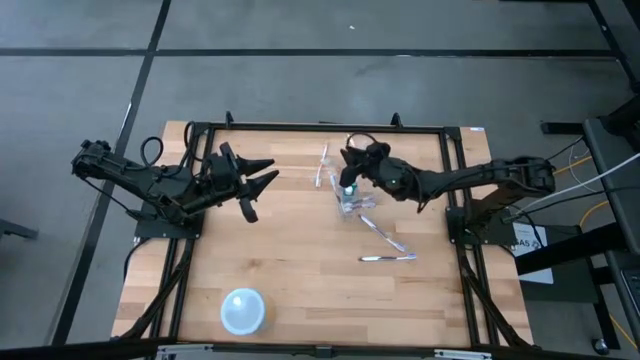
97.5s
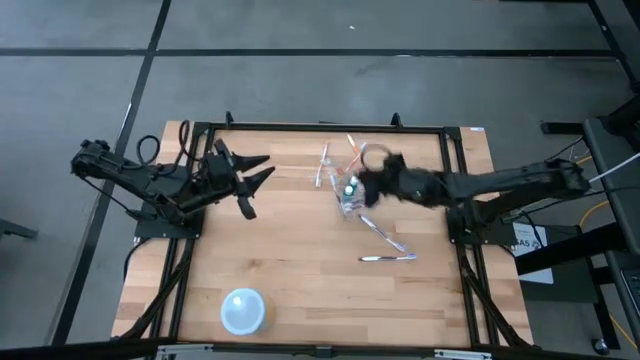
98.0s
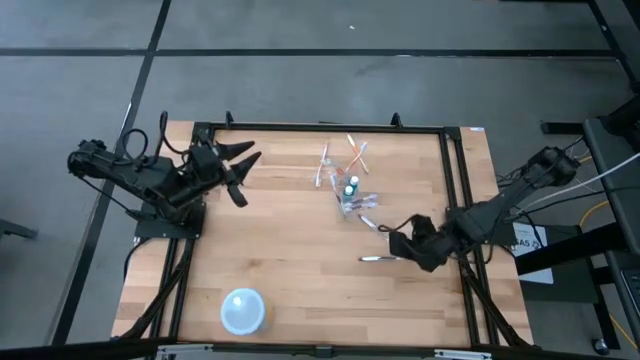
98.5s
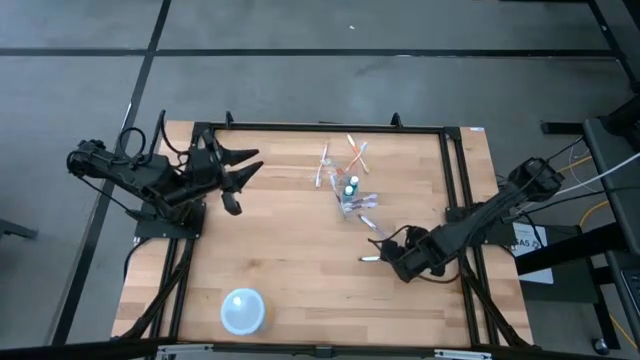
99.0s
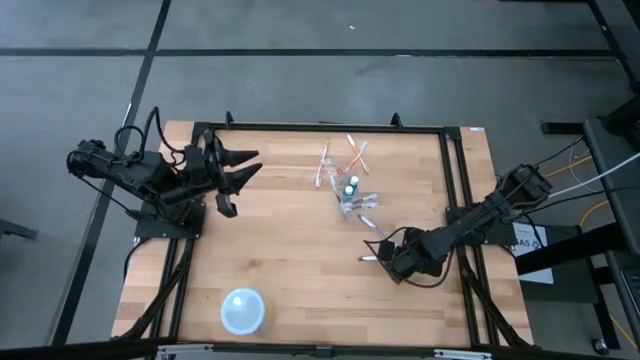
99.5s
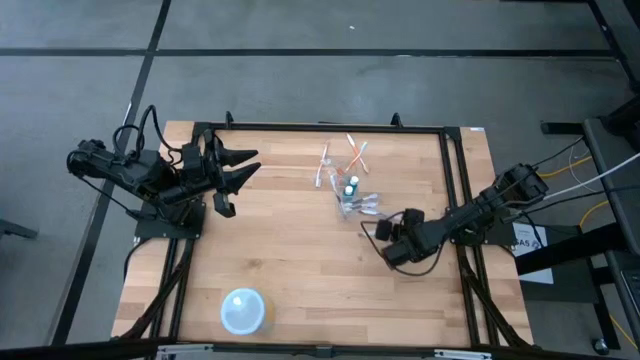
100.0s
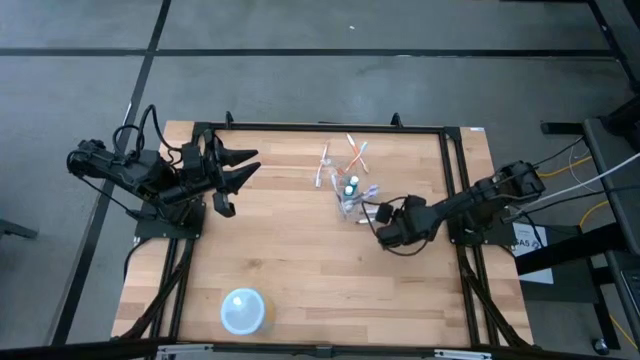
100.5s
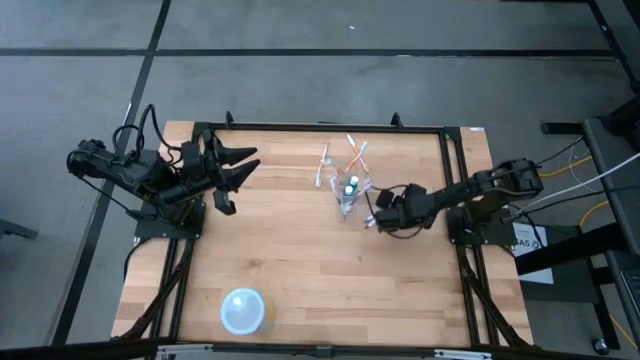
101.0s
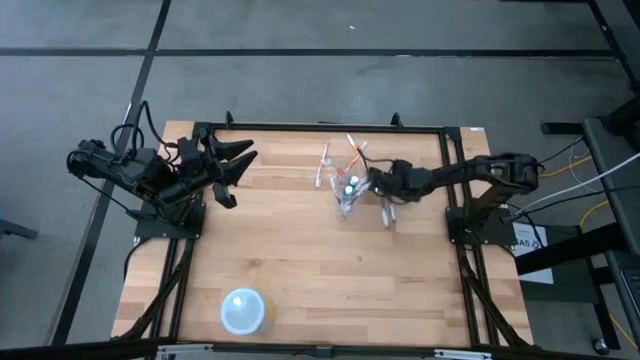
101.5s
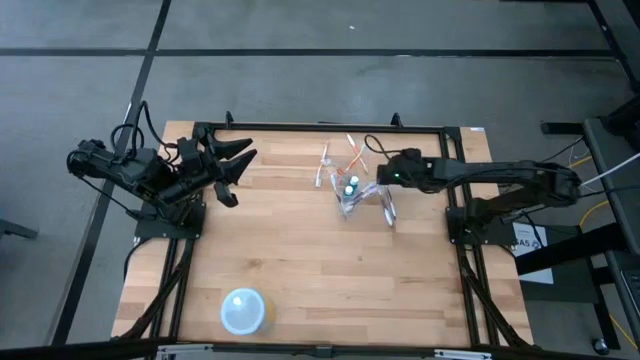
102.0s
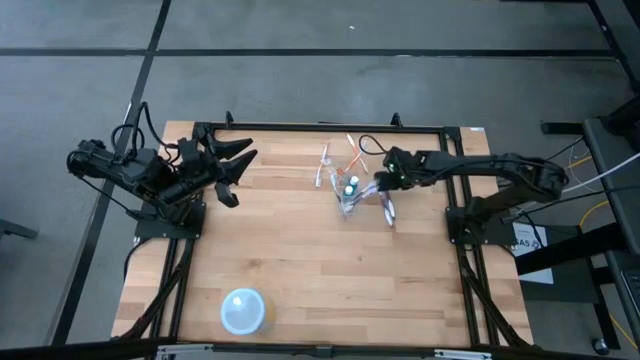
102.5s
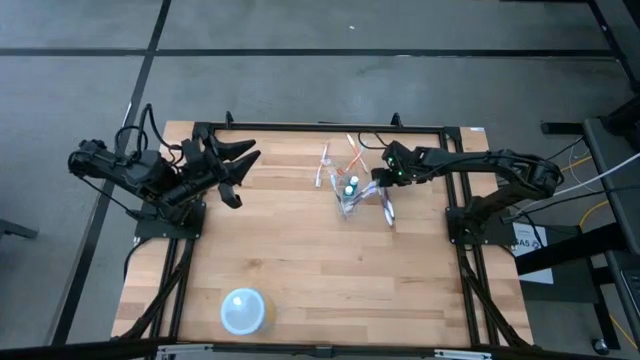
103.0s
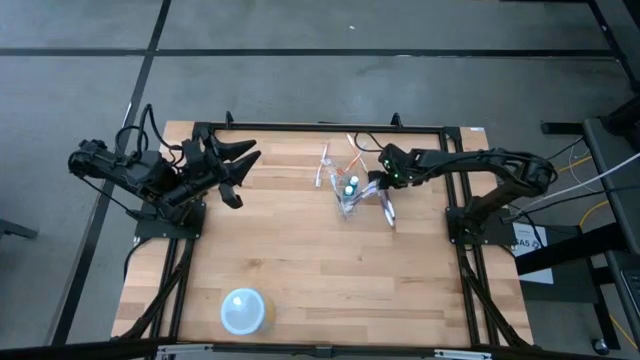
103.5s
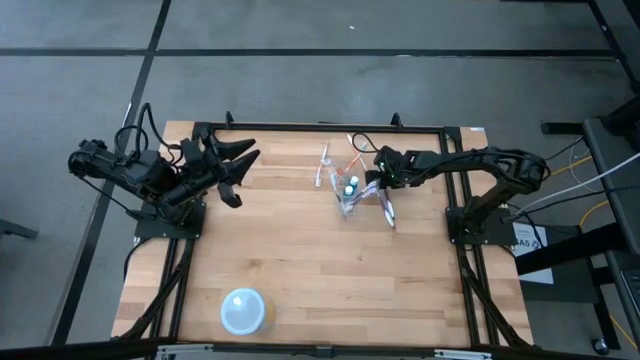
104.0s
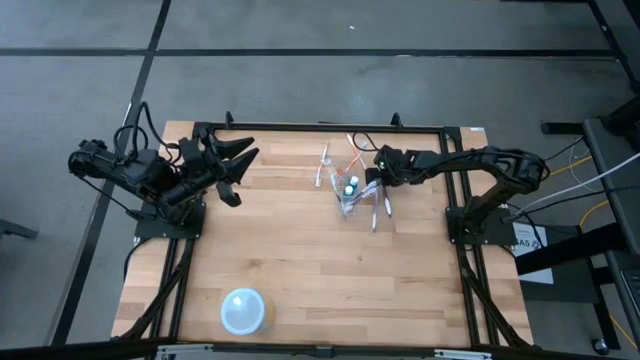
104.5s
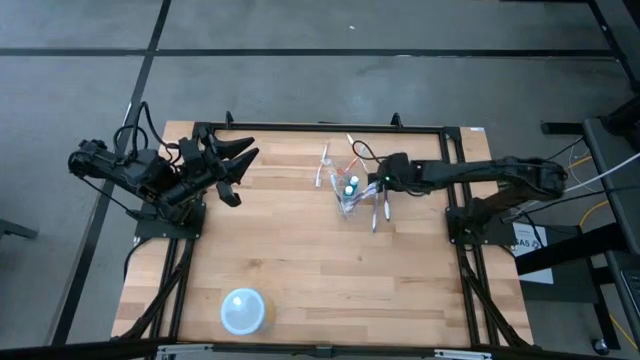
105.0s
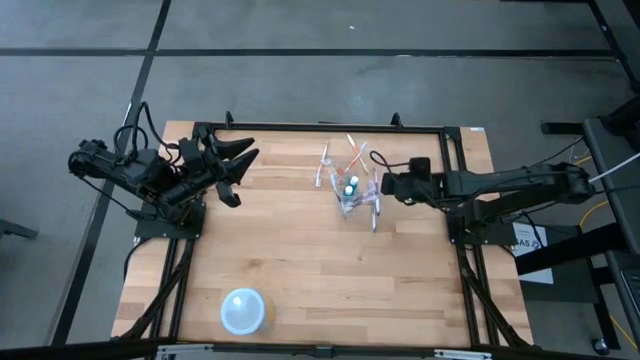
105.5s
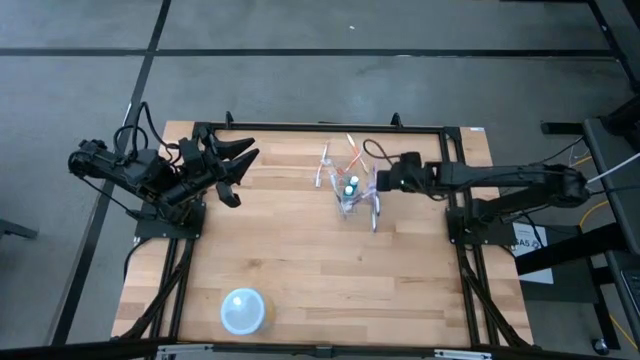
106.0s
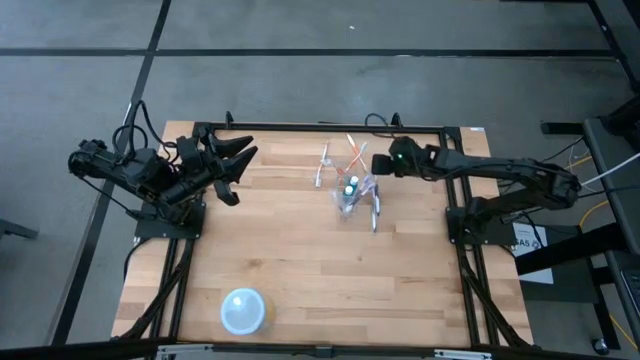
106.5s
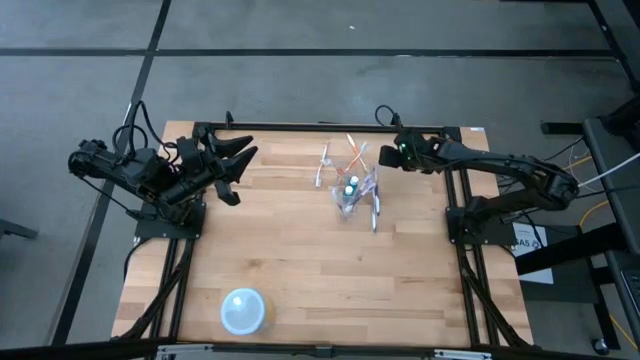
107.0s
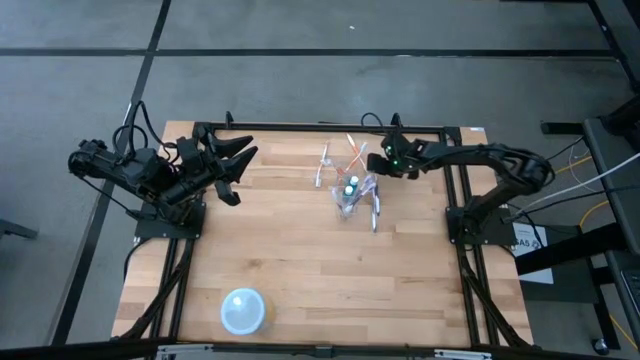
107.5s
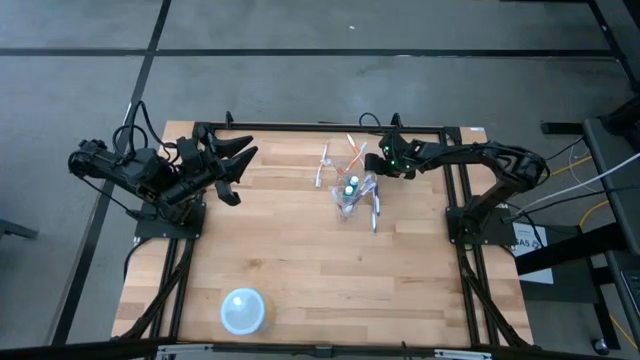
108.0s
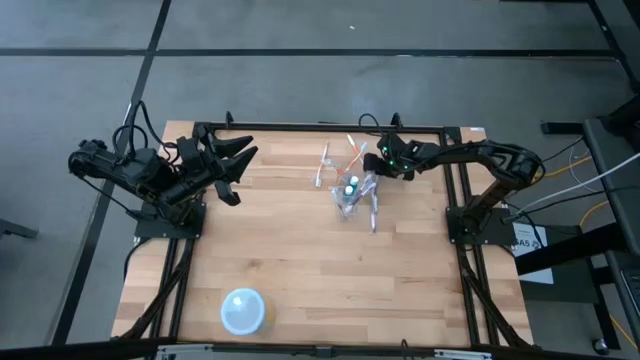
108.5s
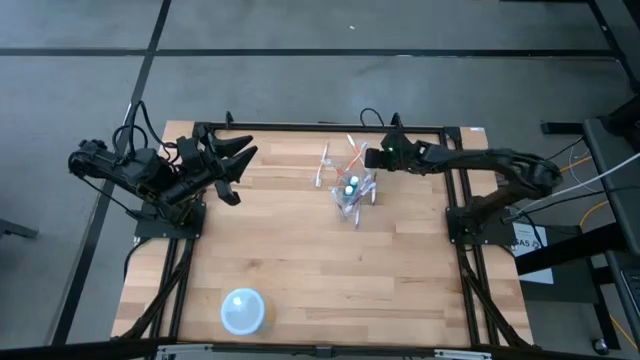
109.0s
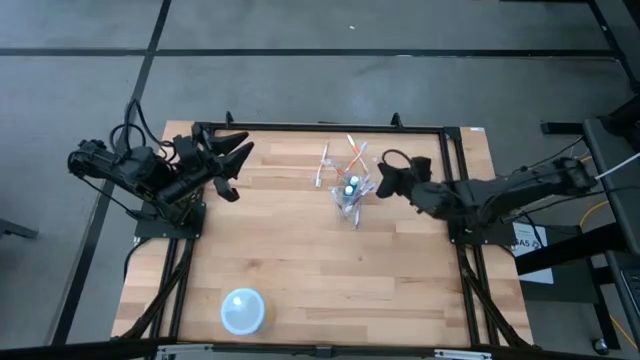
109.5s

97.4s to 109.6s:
Task: Pick & Place toothbrushing station
Put the purple toothbrush into the transparent organizer

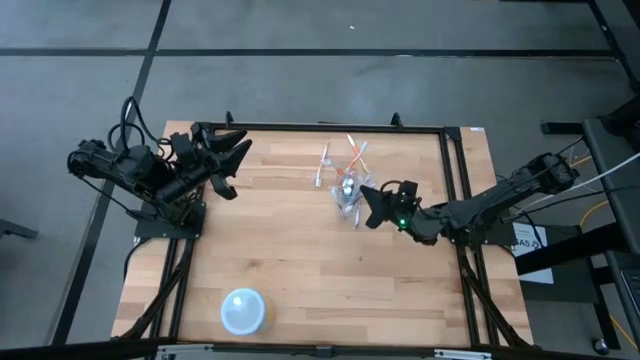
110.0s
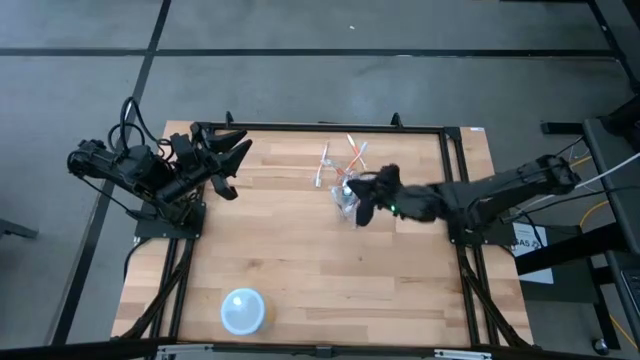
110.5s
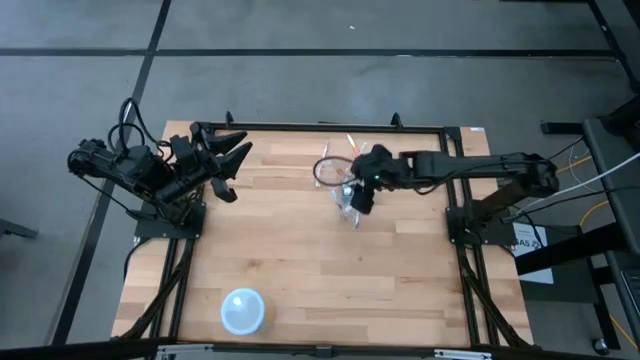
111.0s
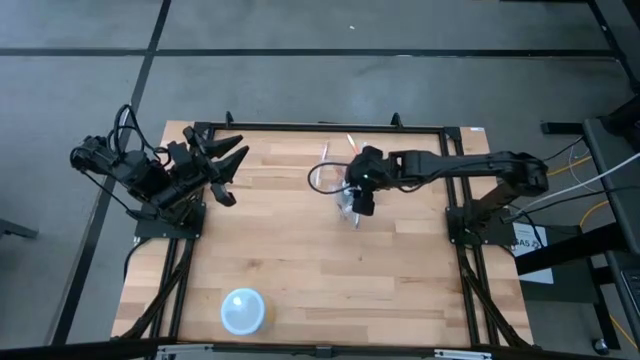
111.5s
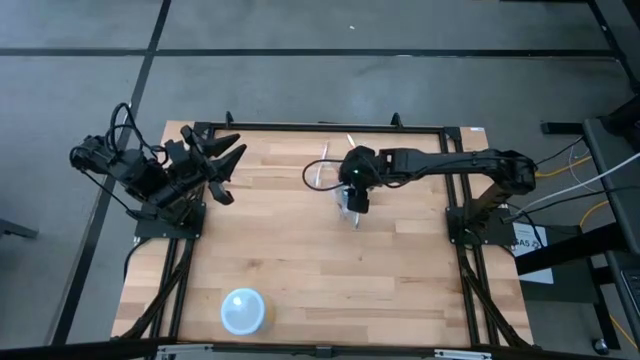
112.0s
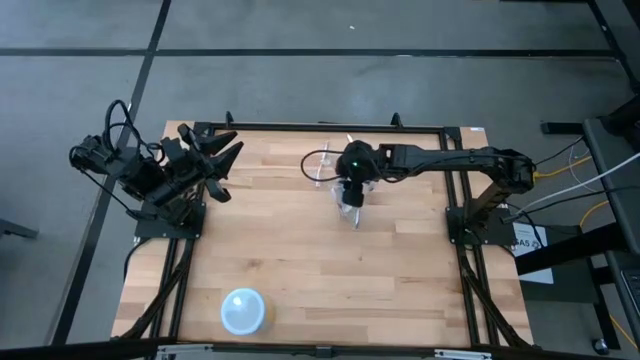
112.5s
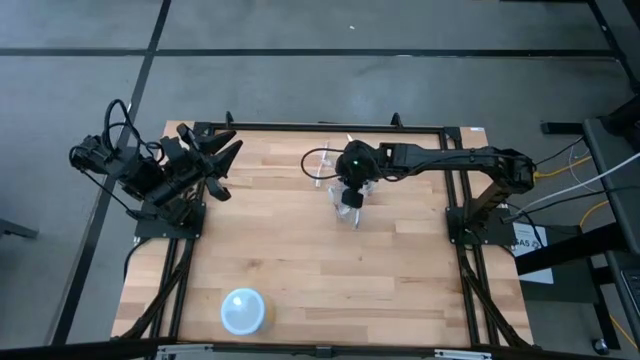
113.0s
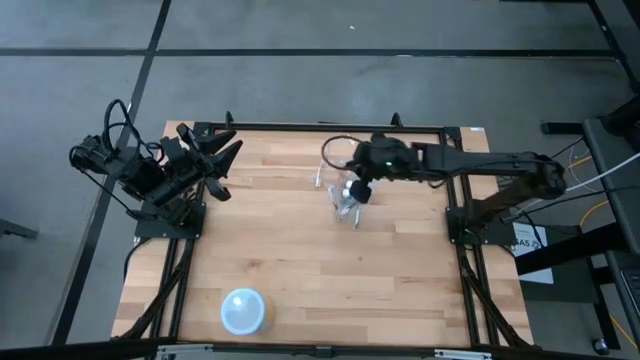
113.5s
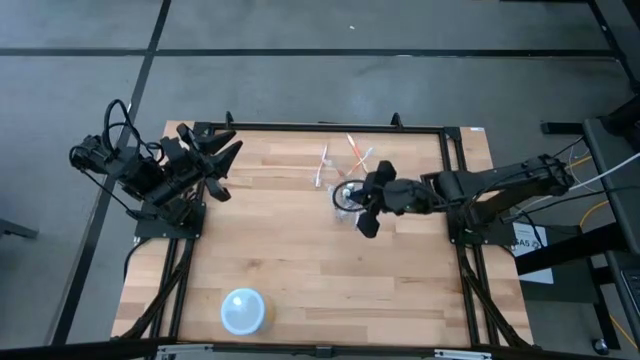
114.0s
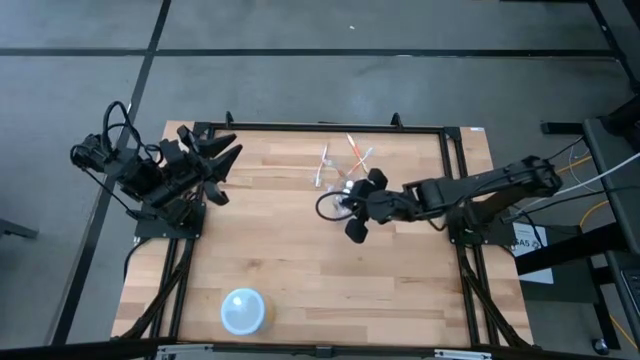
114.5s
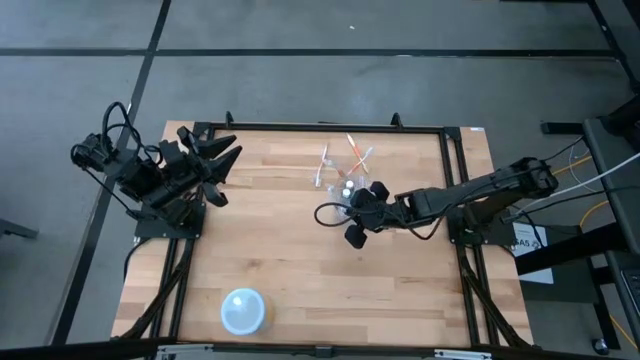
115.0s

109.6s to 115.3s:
Put the purple toothbrush into the transparent organizer

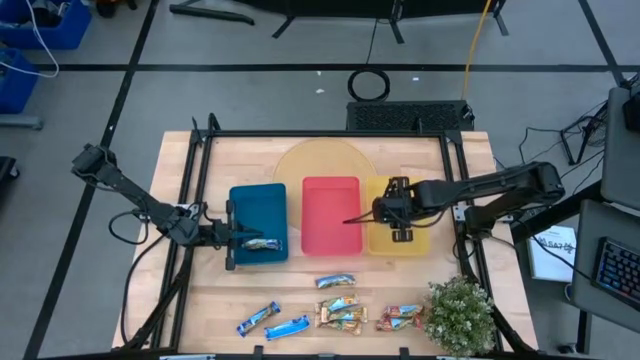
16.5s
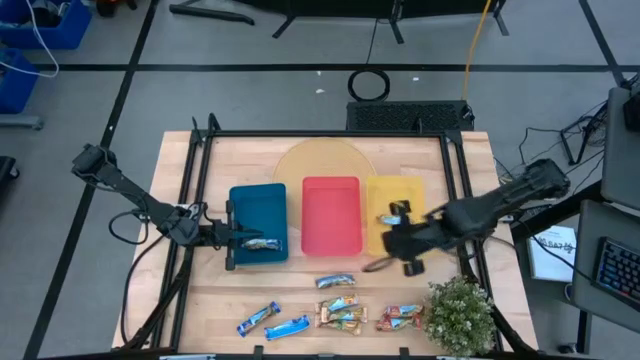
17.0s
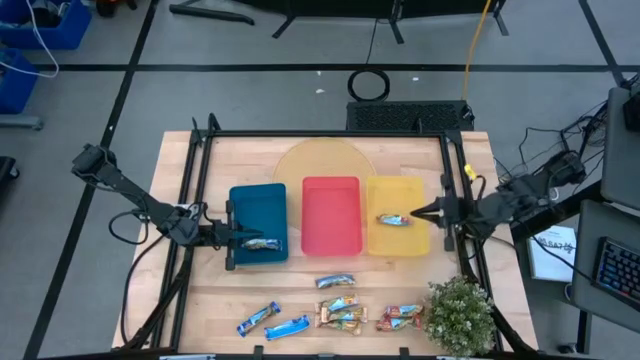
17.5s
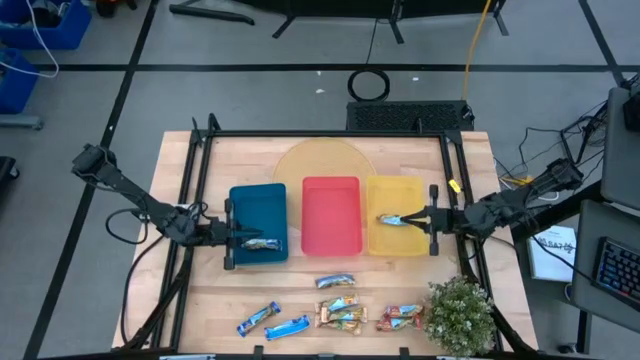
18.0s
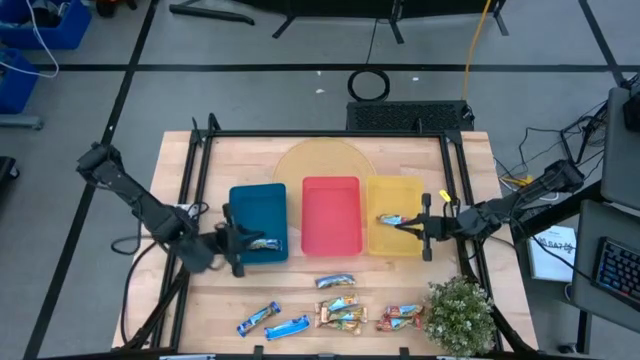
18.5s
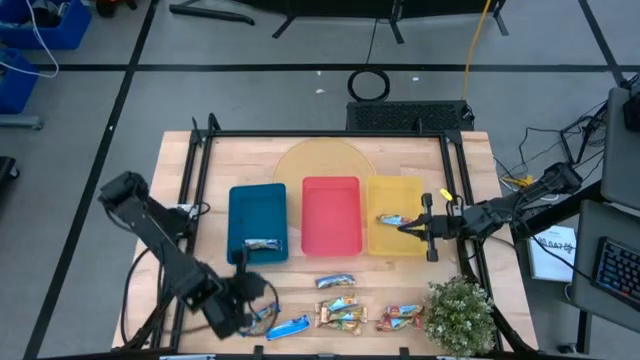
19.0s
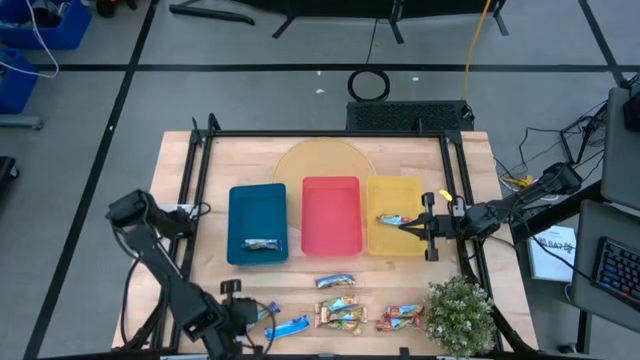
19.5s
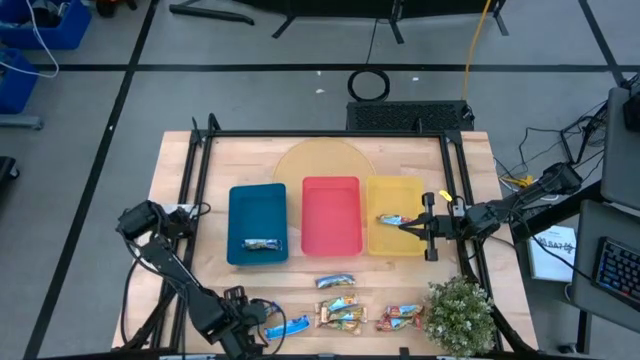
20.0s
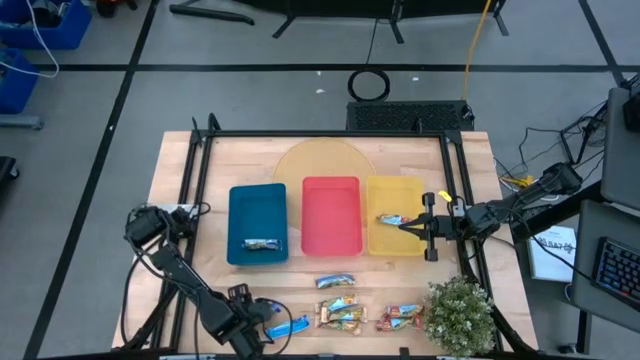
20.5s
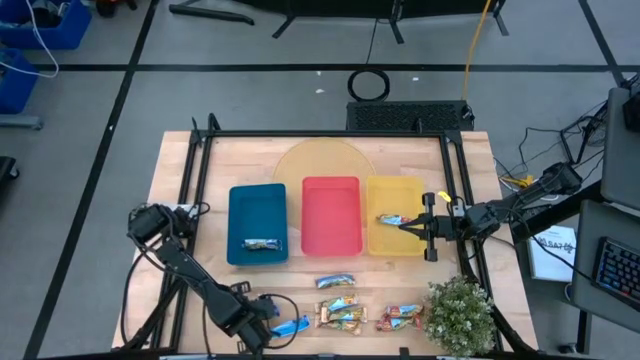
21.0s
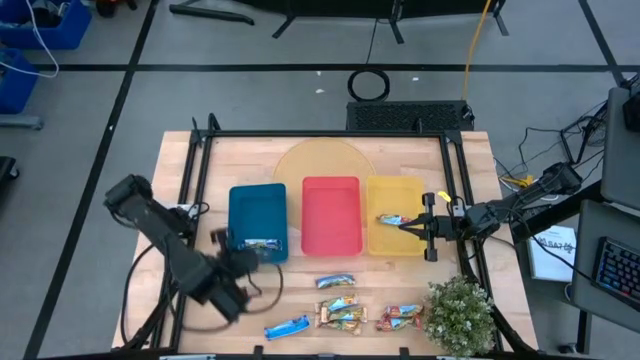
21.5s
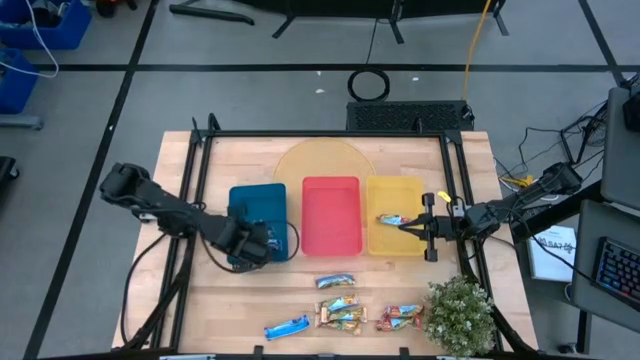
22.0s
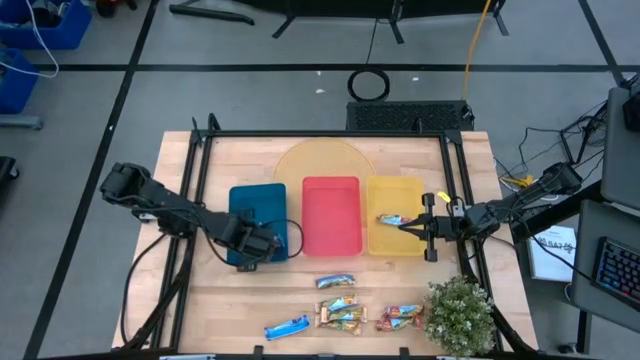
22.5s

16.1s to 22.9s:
Task: Pick and place Granola Bars by type
Put the top blue granola bar into the blue bin
